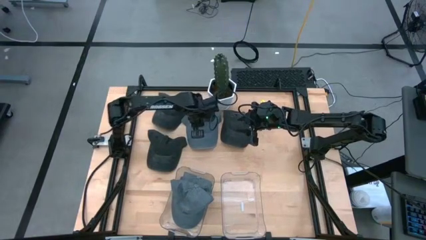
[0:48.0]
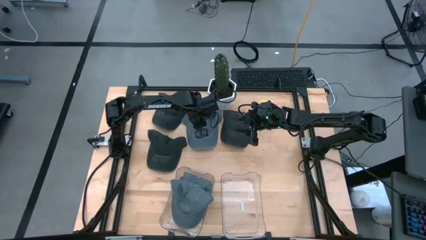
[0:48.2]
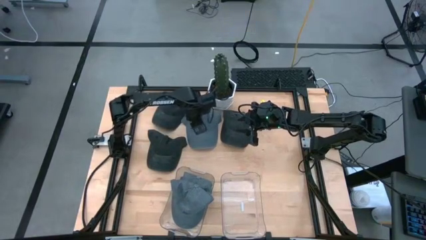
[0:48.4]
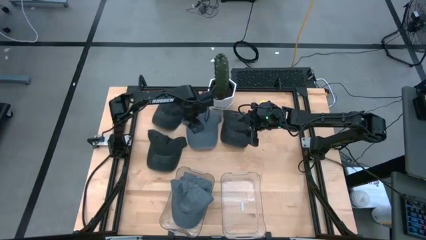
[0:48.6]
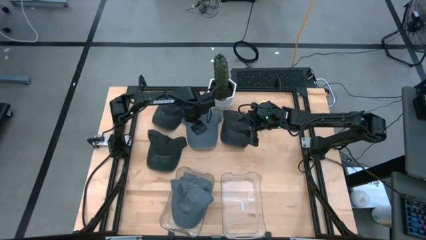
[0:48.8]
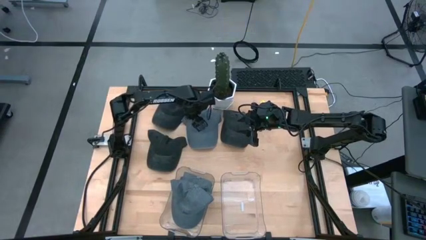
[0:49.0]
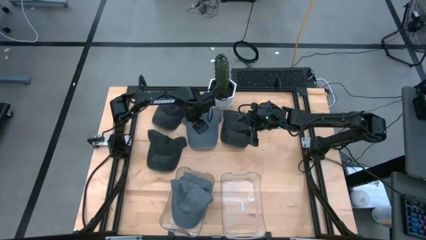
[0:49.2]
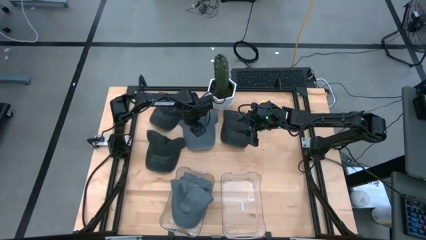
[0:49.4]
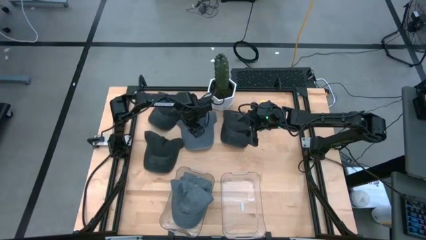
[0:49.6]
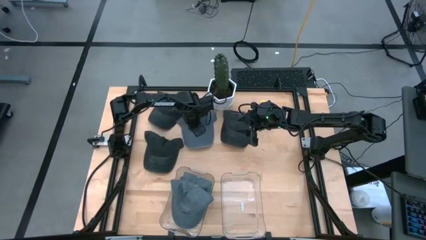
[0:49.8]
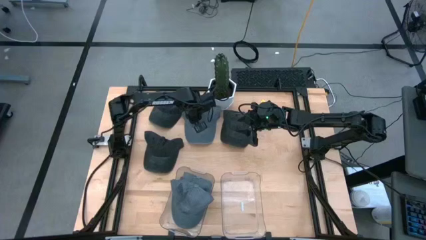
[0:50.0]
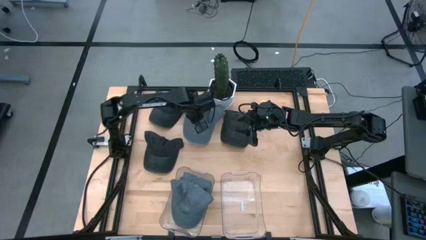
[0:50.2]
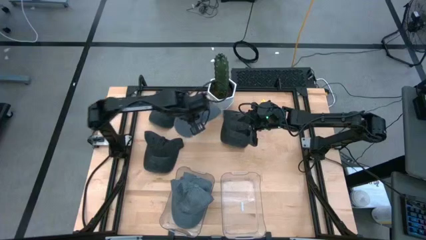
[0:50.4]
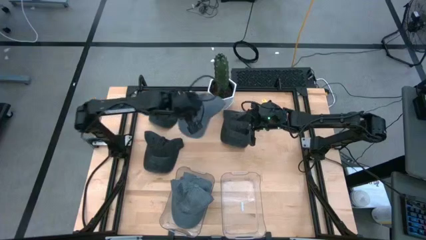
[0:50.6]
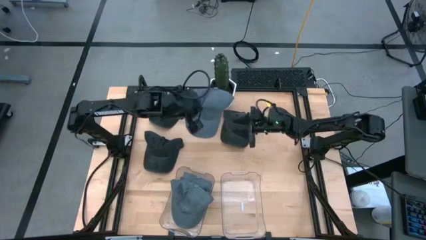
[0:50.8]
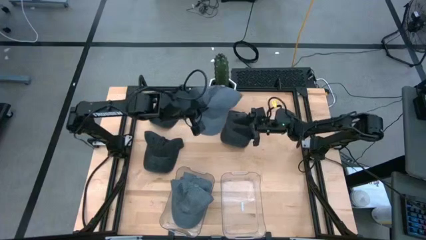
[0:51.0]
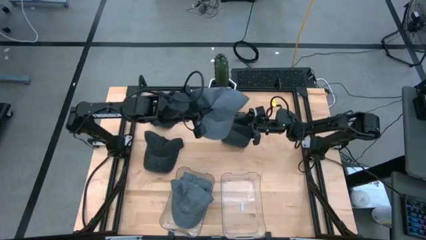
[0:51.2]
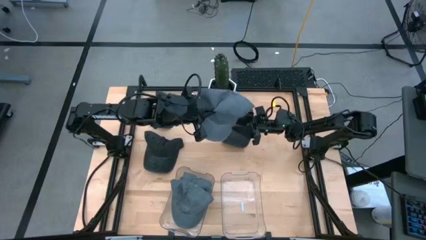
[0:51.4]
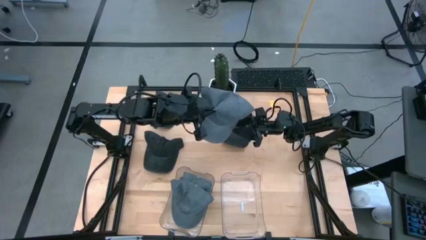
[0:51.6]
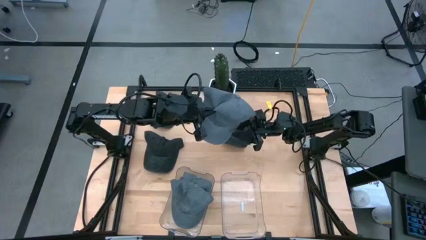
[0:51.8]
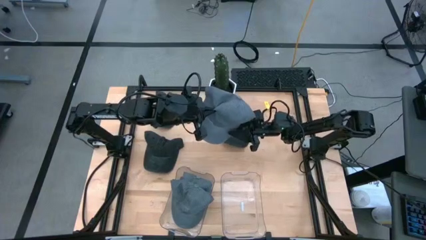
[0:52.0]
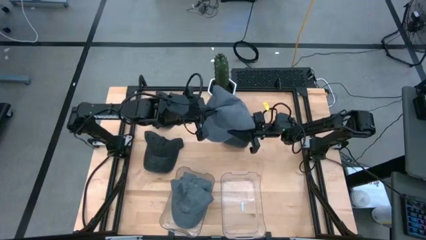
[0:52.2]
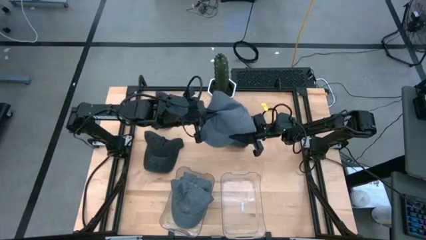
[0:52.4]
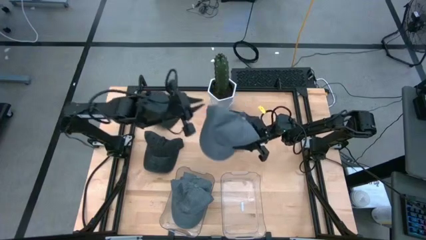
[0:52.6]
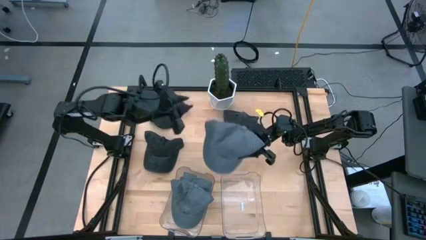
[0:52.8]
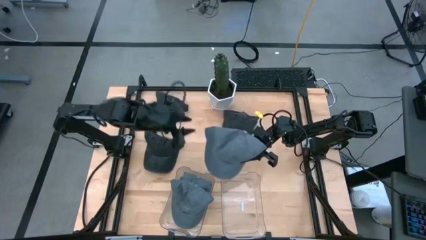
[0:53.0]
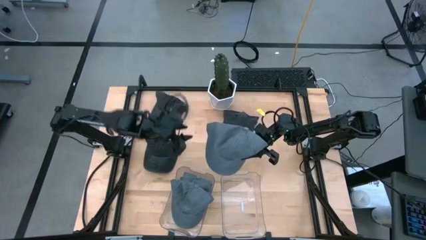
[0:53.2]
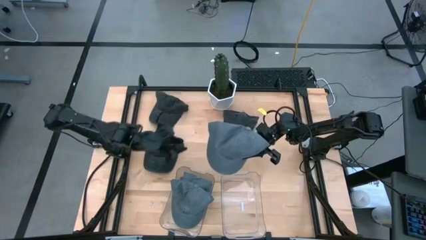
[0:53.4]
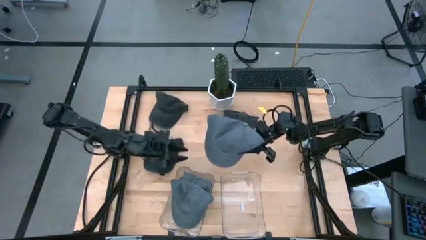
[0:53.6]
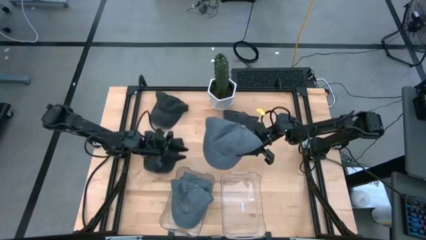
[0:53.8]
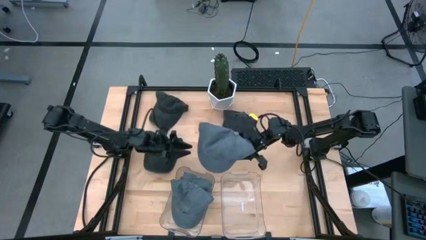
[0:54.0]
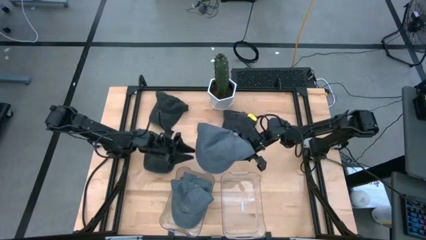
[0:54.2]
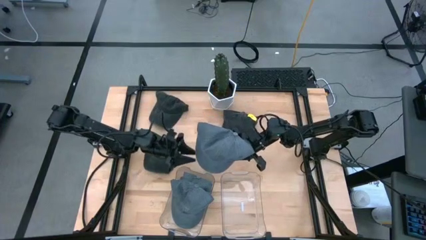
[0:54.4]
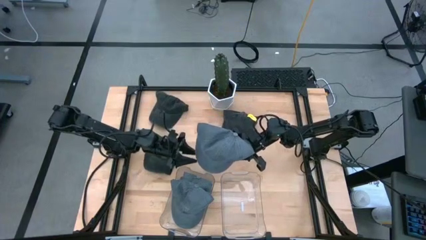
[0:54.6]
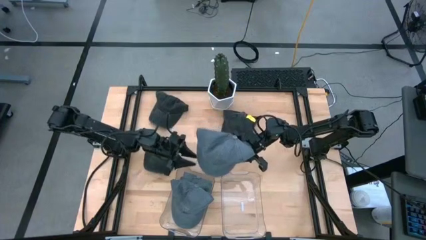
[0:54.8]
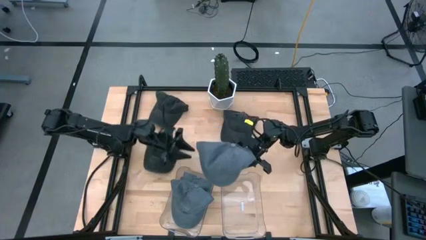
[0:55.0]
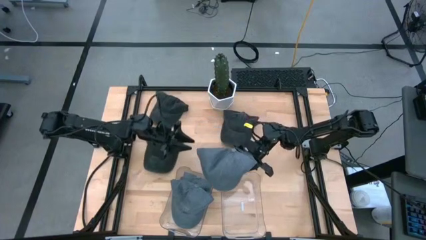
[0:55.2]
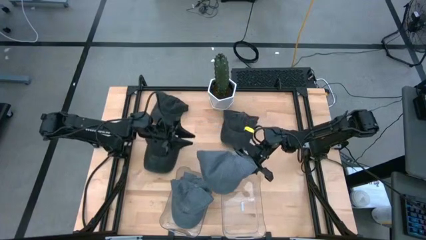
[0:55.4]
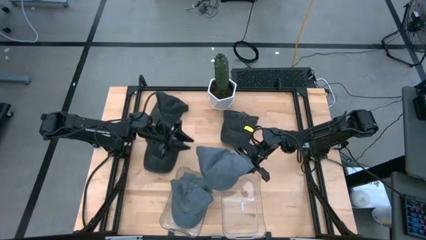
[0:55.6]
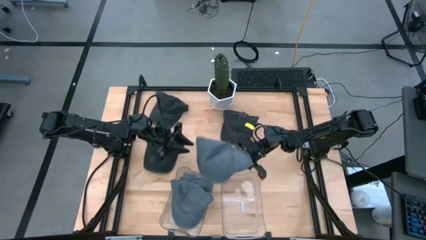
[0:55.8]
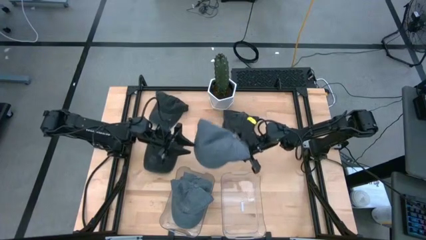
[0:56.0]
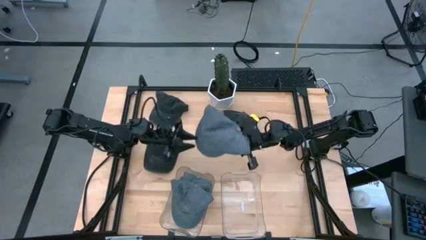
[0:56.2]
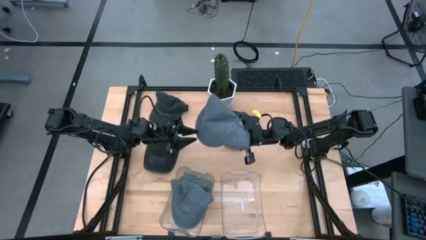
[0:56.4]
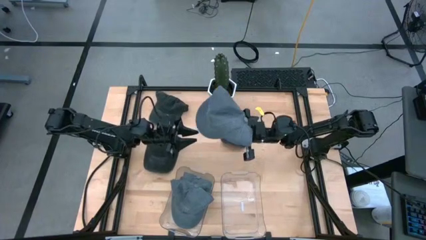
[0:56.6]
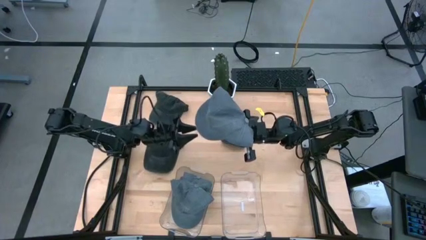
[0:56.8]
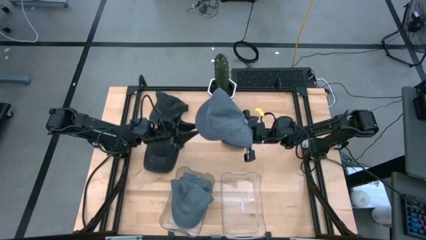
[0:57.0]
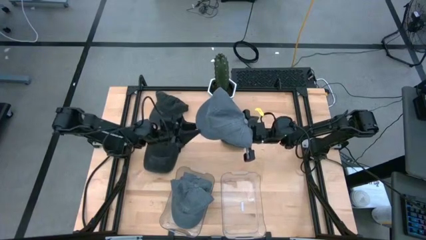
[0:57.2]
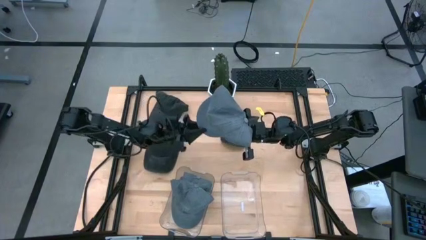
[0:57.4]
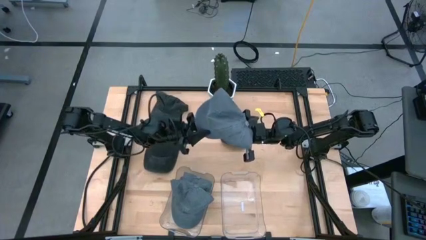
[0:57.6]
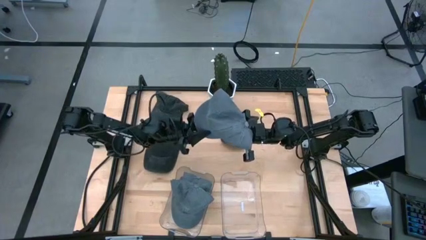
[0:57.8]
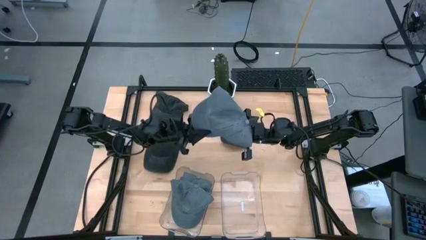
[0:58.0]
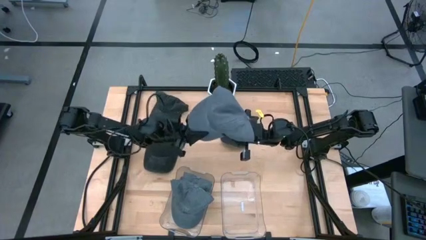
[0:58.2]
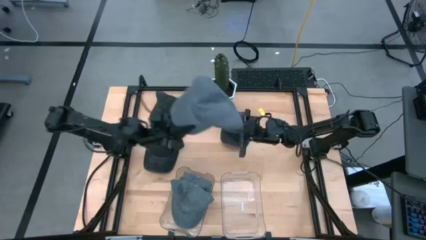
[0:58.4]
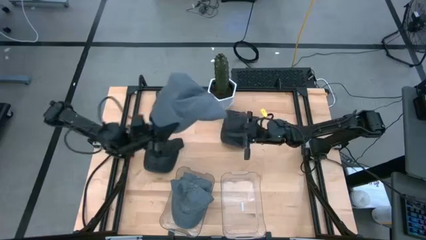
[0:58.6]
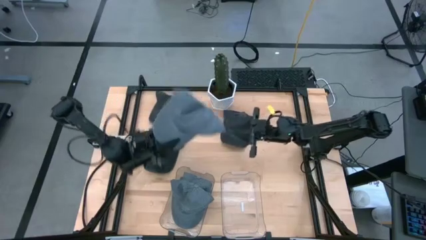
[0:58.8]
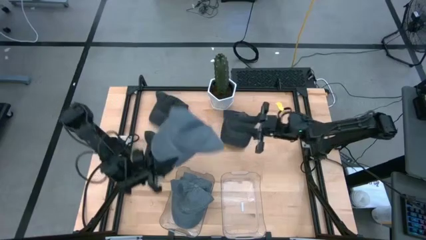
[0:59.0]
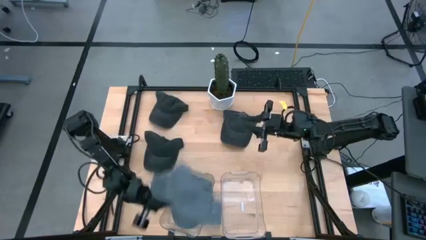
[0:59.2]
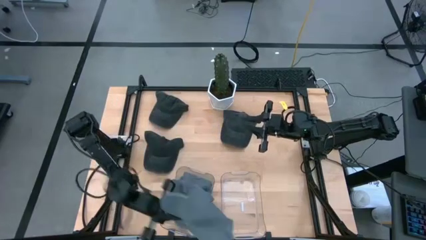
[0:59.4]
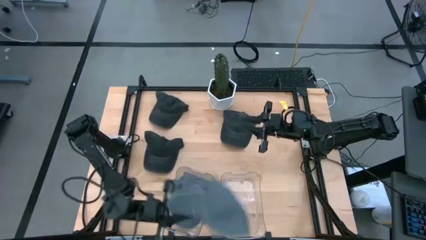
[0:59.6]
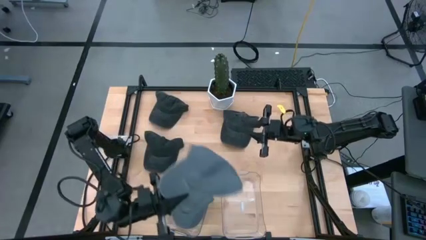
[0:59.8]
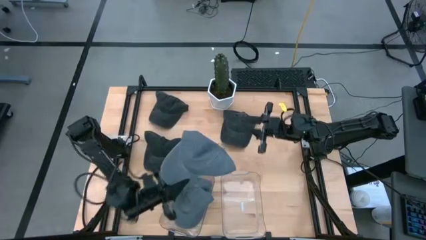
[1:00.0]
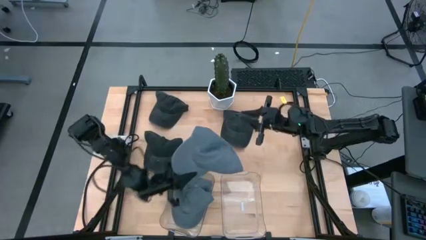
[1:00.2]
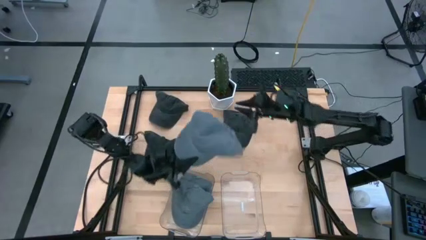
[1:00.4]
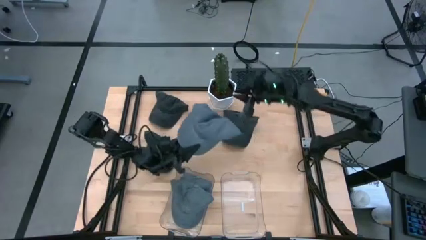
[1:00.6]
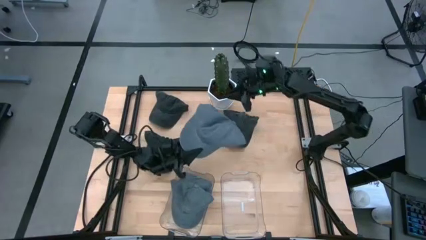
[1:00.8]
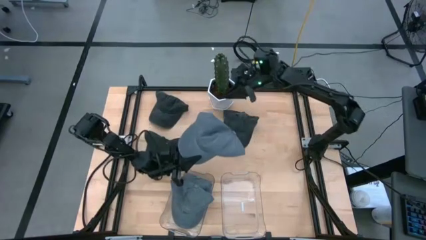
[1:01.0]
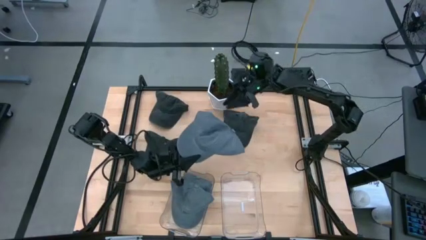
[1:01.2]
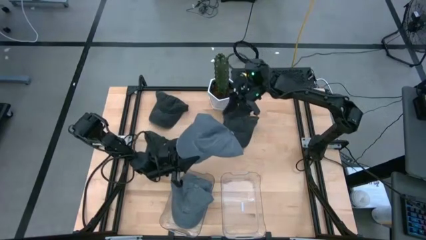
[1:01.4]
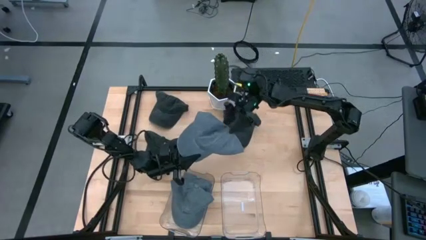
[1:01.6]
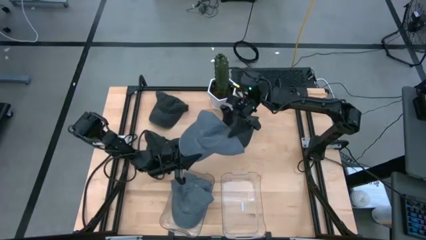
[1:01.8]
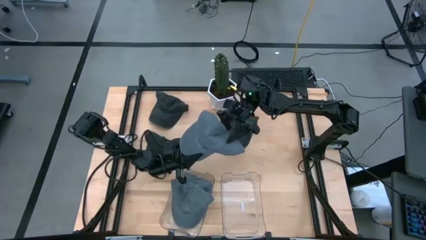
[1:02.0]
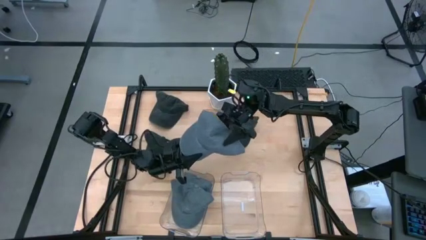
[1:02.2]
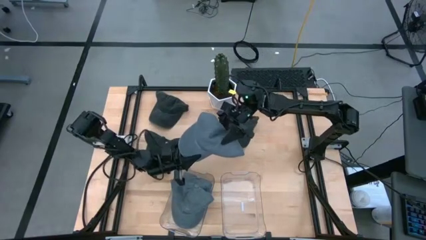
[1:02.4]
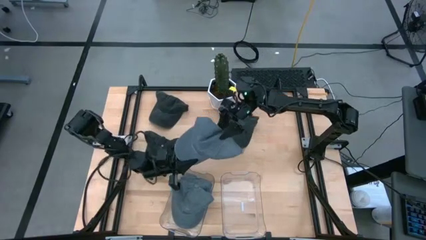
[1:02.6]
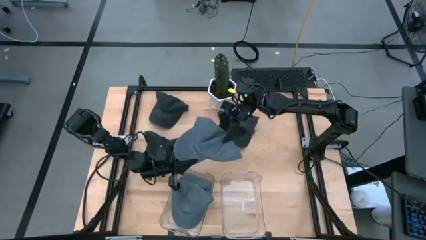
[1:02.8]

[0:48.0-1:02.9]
Task: Pick & Place hat
Put the gray cap into the left transparent bin

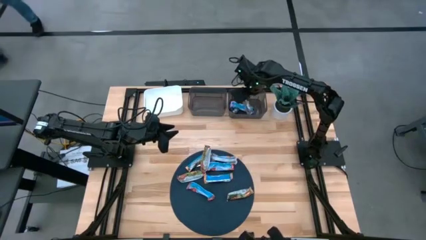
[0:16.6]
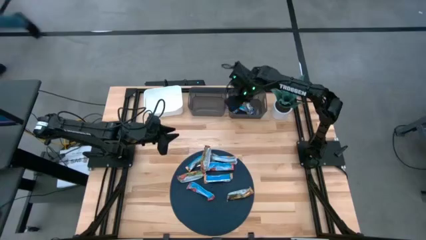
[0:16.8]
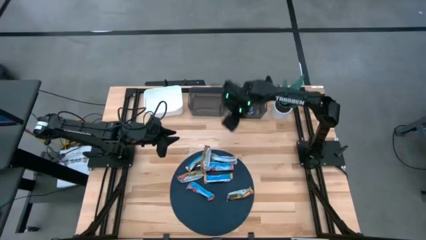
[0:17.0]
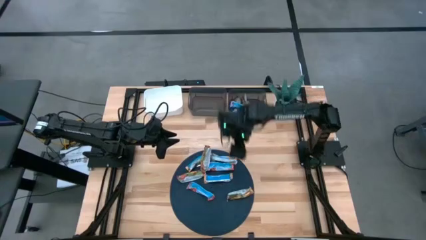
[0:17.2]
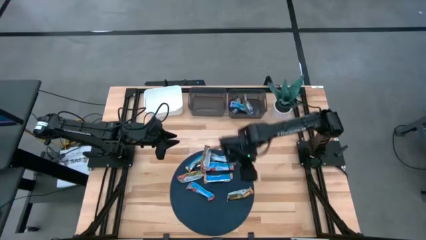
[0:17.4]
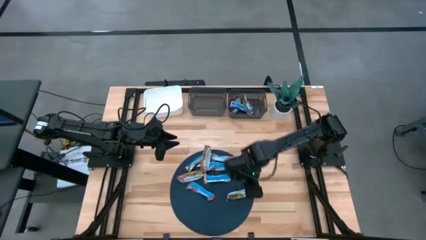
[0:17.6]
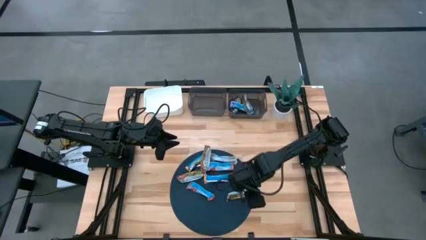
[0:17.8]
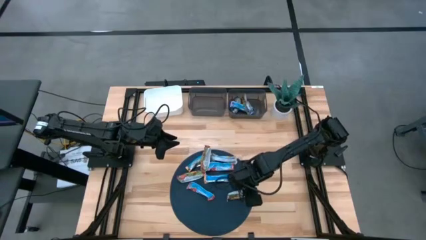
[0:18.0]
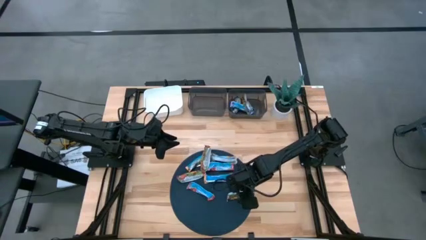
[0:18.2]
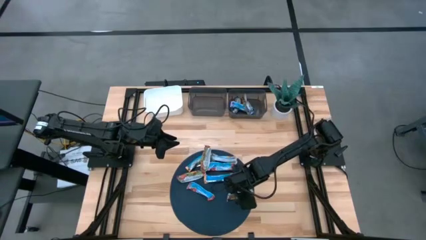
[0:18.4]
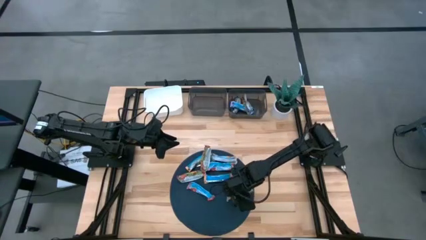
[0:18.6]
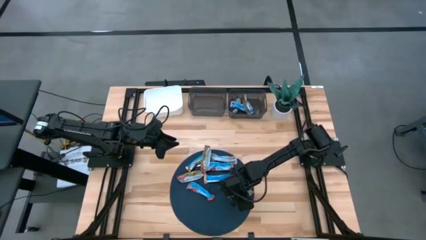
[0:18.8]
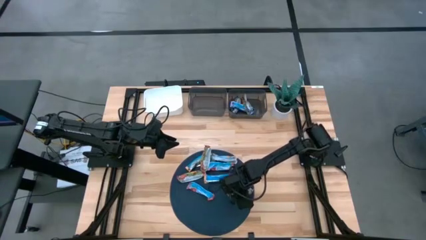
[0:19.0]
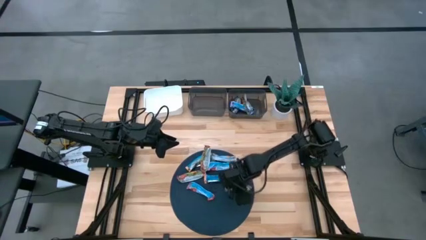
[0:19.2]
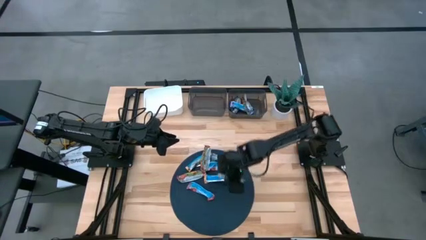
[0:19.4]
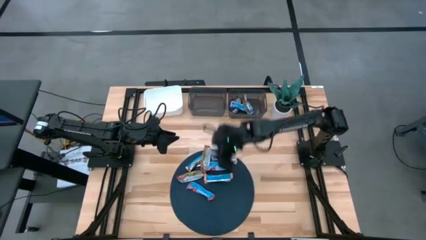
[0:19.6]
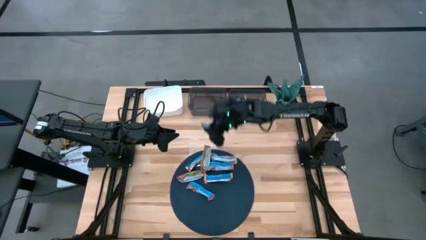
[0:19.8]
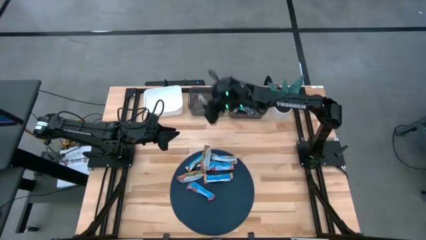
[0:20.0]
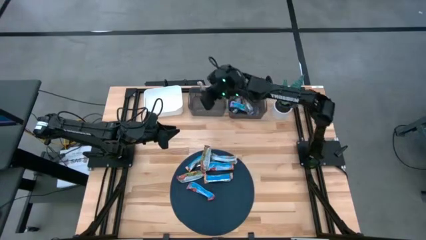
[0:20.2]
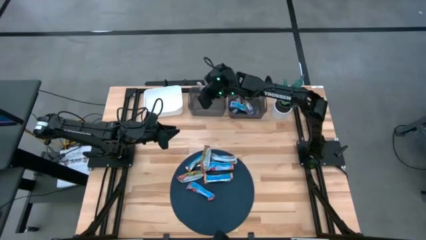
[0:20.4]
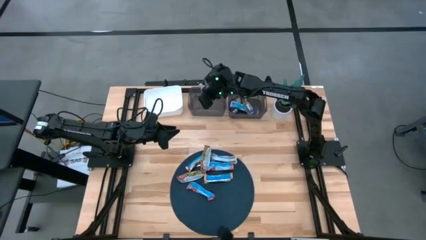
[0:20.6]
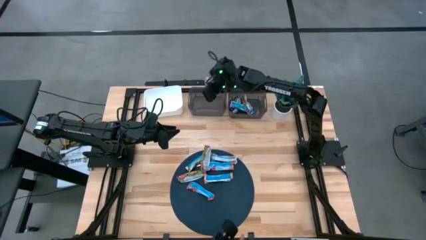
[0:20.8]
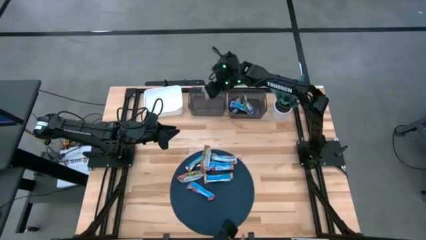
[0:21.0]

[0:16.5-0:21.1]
Task: Pick and place Granola Bars by type
Put the orange granola bar into the left black transparent bin
